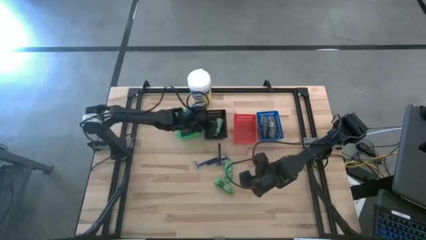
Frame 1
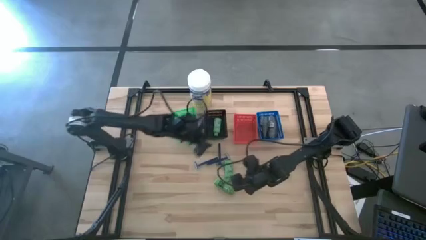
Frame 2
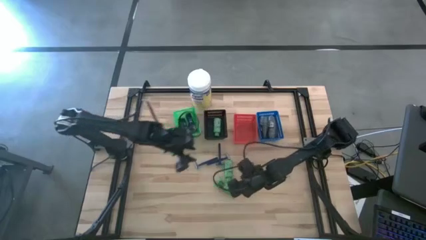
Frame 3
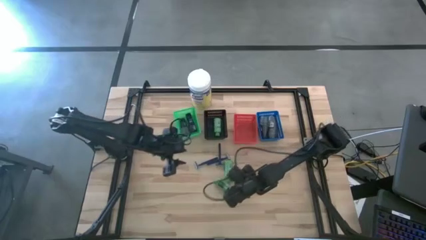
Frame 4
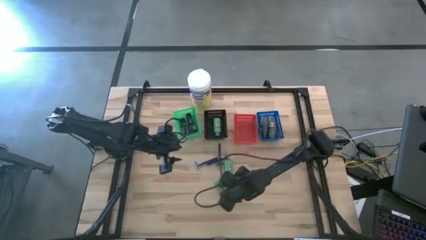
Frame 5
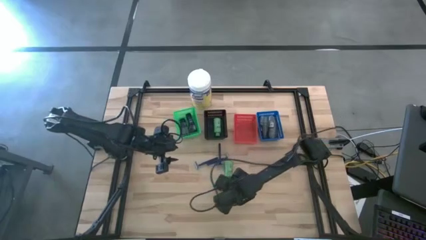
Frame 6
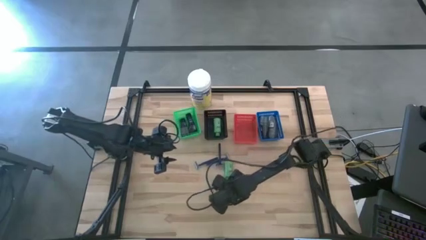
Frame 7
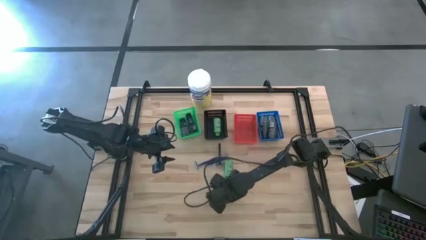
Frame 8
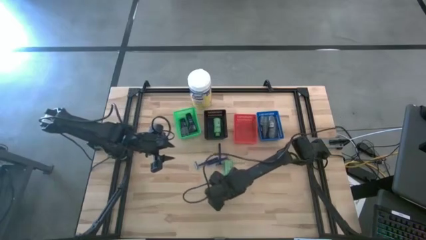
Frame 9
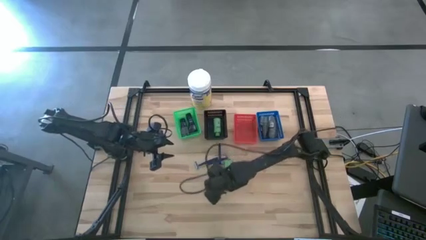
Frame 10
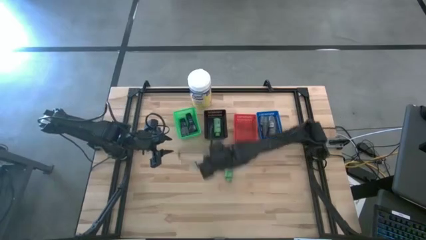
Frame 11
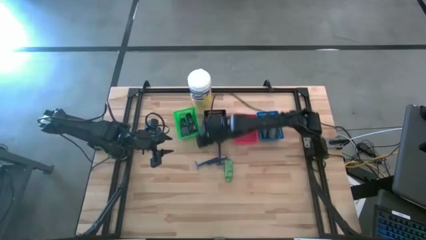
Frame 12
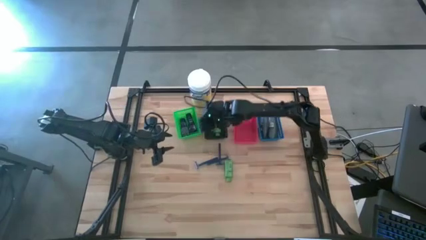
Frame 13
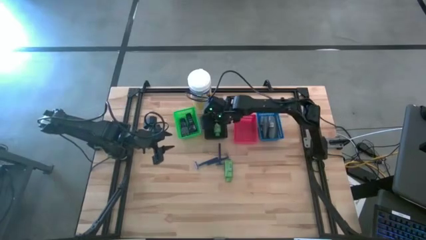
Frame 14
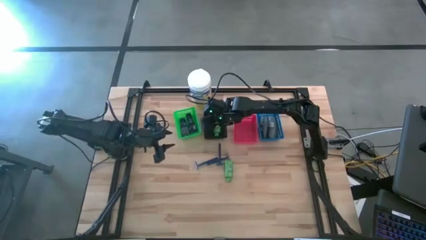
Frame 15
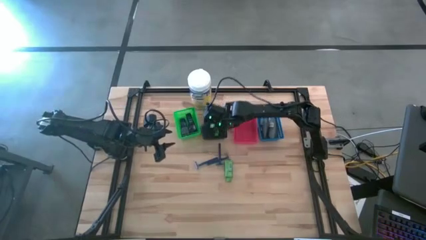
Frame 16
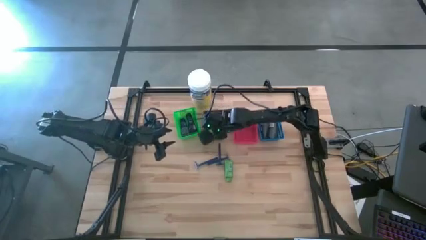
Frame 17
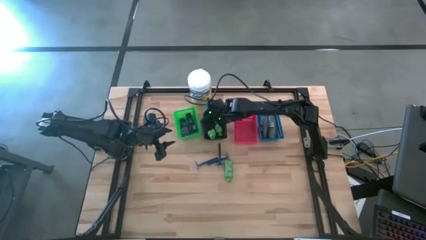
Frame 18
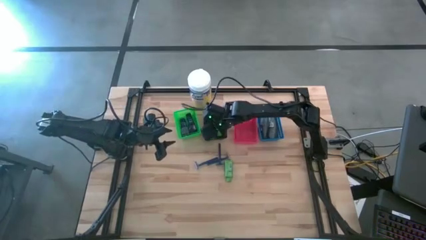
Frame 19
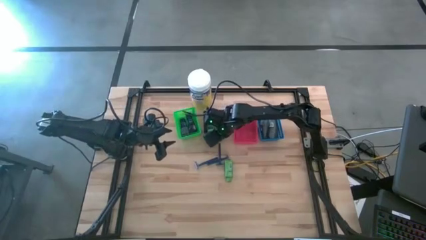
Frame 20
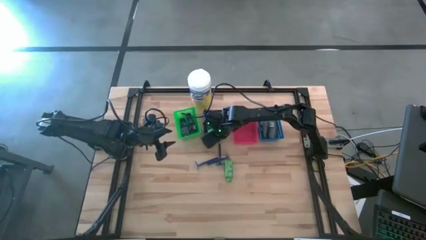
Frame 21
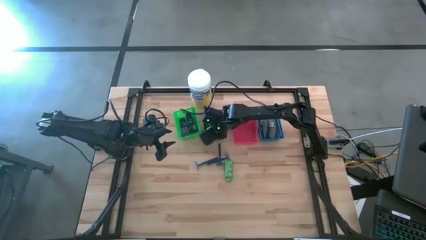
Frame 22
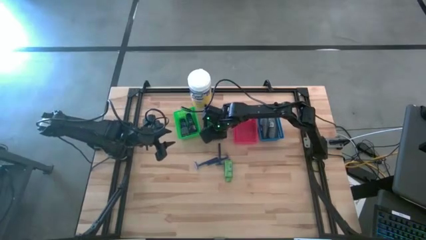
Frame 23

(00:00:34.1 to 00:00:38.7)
Task: Pick & Place Travel size toiletries
Put the green shampoo into the black bin

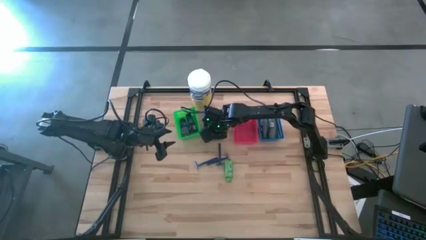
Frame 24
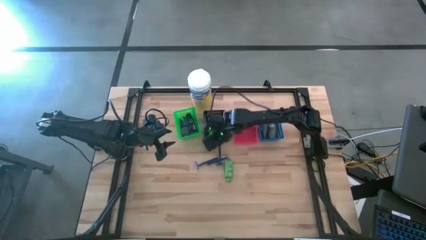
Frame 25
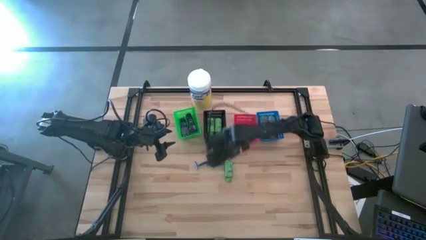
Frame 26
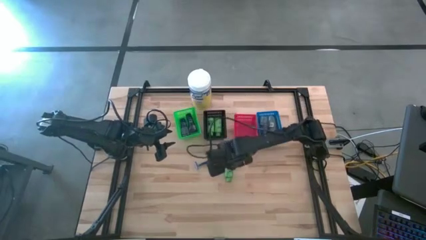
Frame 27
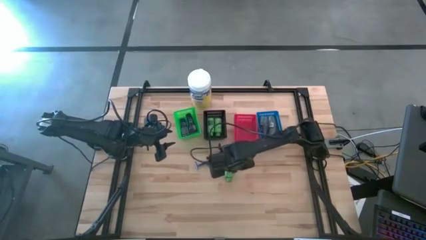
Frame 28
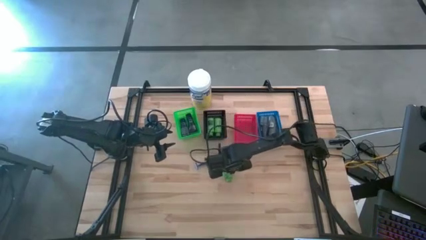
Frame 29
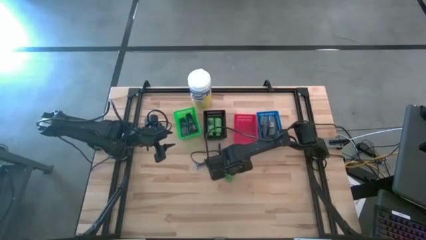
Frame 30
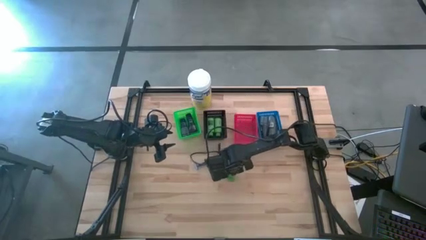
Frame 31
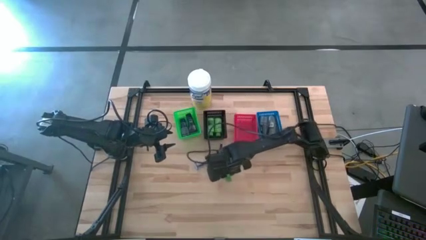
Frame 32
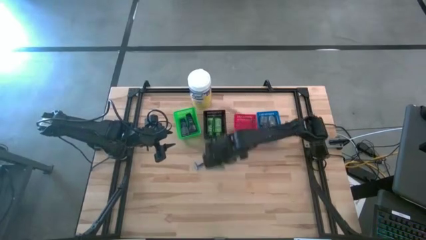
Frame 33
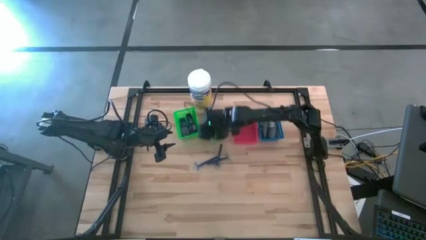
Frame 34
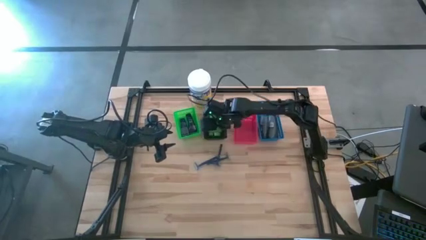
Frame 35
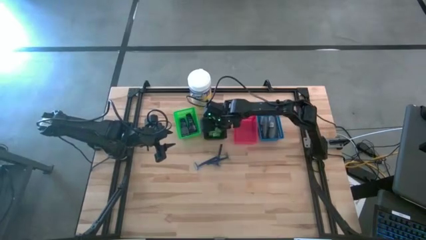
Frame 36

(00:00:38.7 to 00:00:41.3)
Put the green shampoo into the black bin

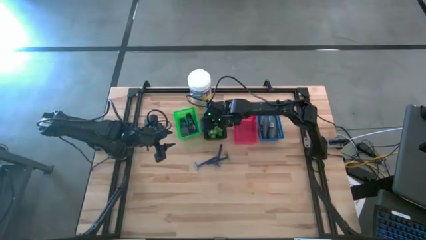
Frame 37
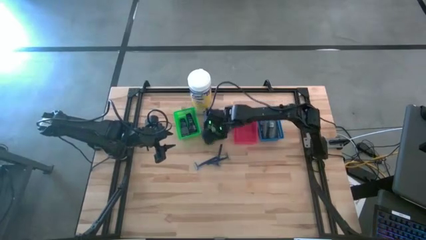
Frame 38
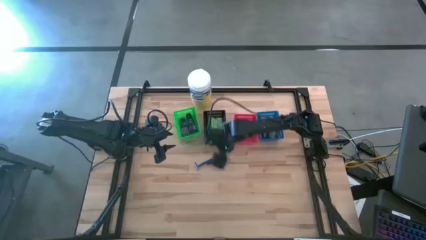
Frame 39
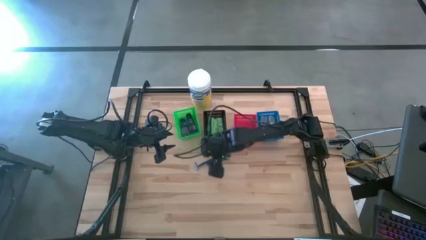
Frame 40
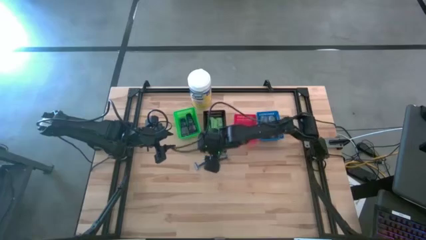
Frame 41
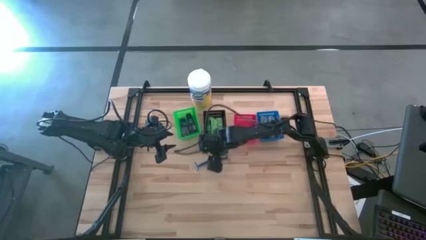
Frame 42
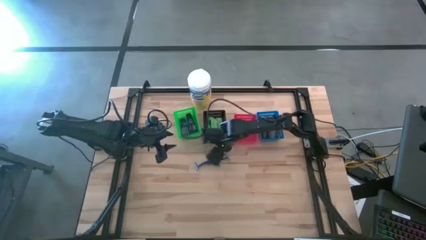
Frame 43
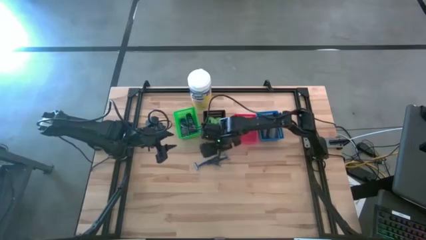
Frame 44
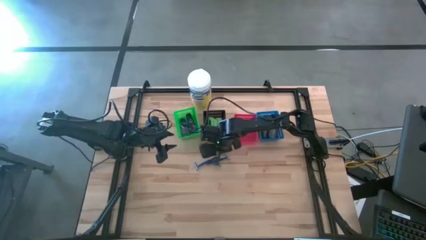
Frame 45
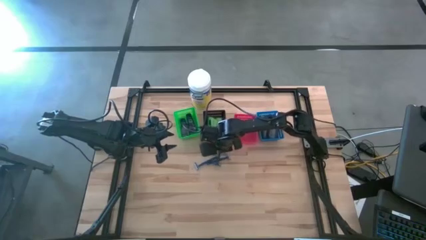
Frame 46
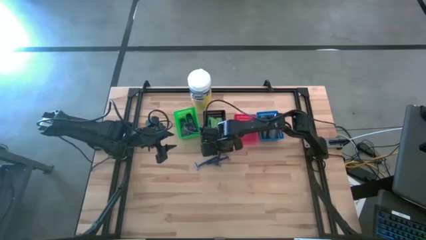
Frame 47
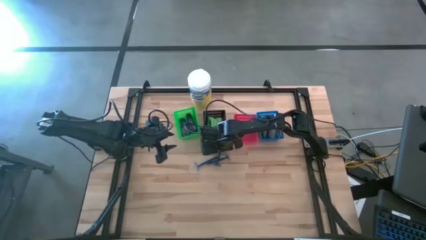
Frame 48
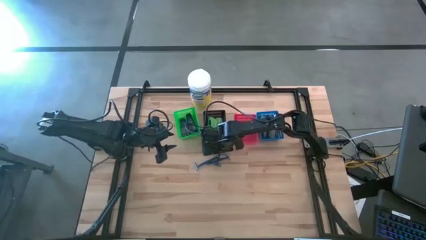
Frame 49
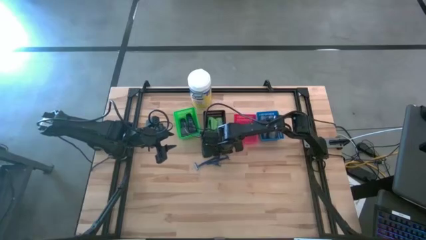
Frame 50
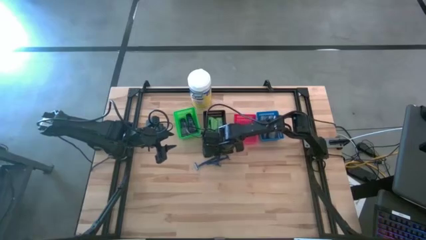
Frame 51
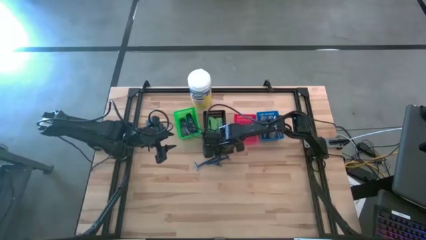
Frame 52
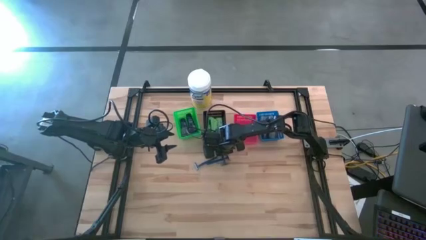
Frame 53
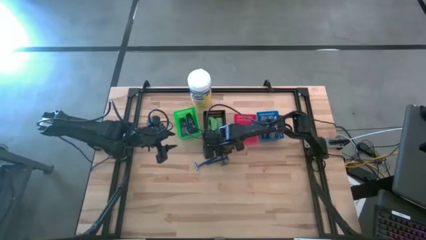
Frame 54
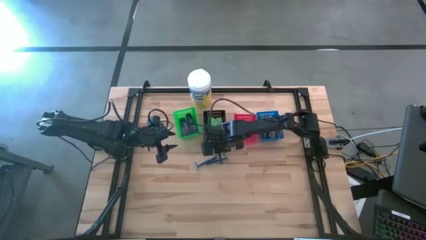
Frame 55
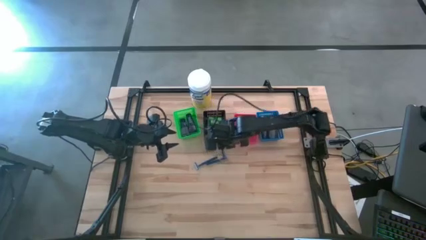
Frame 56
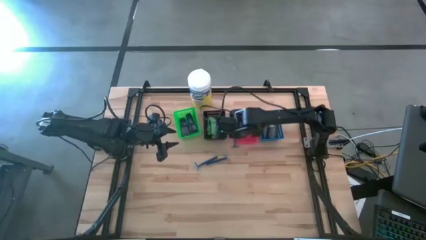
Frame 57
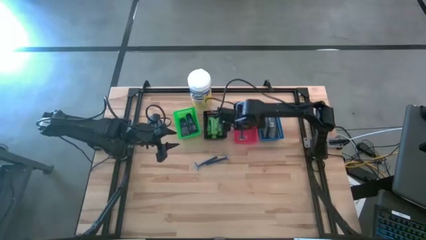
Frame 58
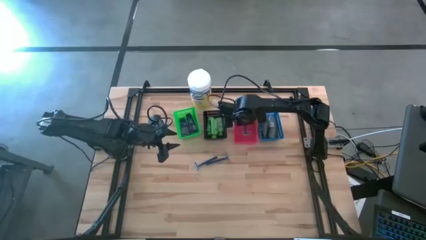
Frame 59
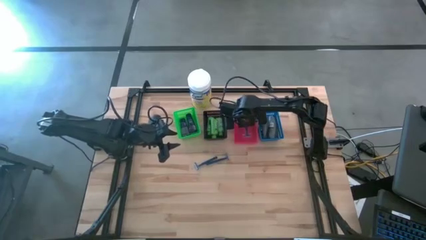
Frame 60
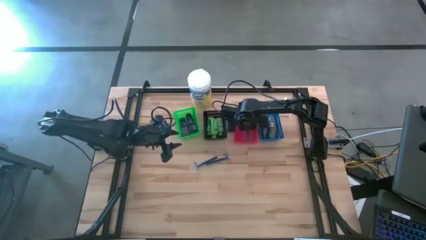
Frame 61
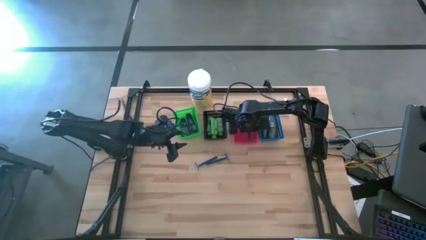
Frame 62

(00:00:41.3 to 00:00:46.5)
Put the blue shavers into the red bin

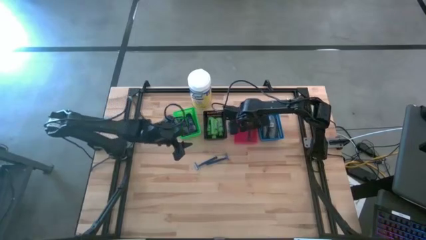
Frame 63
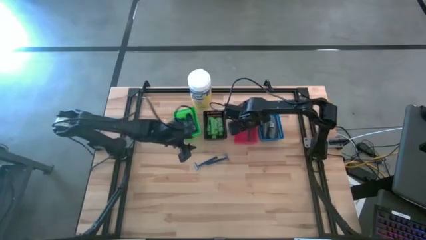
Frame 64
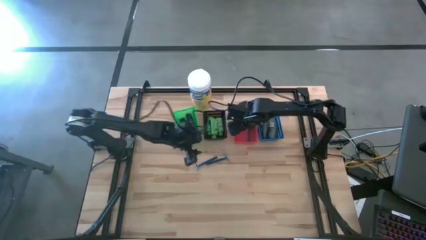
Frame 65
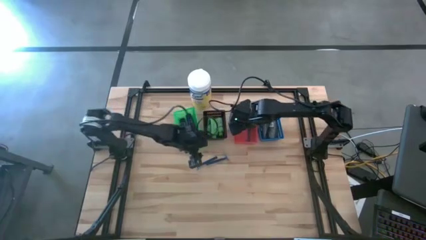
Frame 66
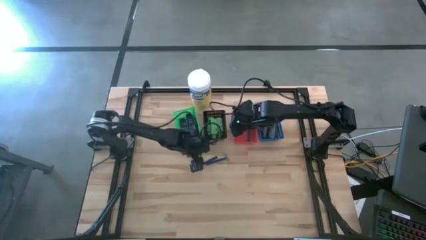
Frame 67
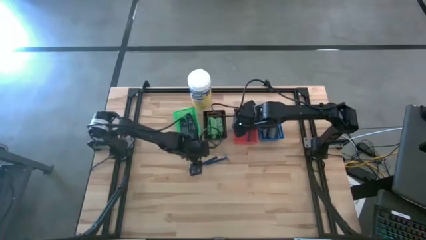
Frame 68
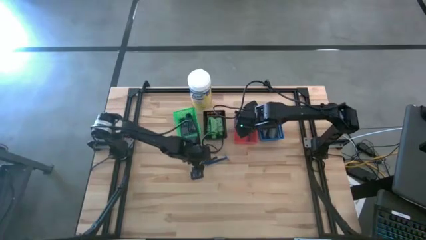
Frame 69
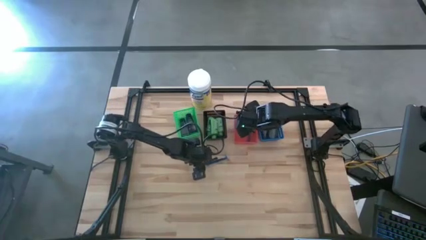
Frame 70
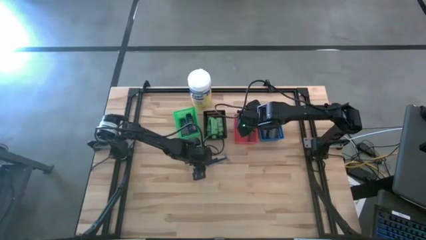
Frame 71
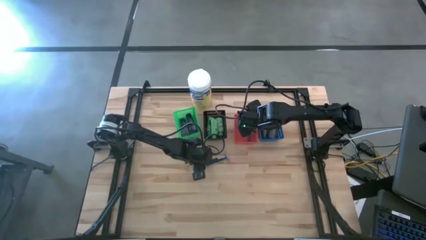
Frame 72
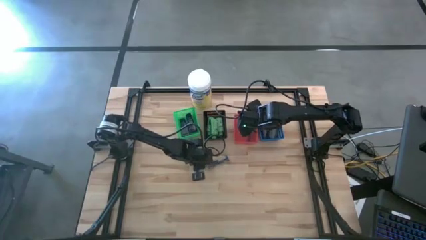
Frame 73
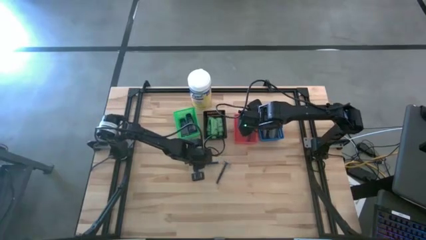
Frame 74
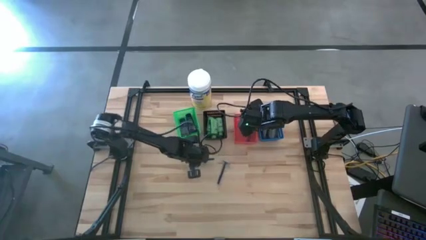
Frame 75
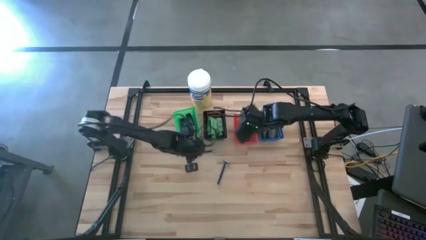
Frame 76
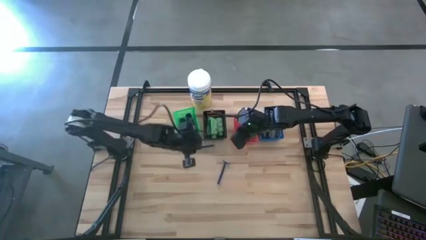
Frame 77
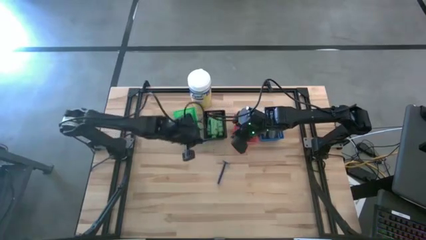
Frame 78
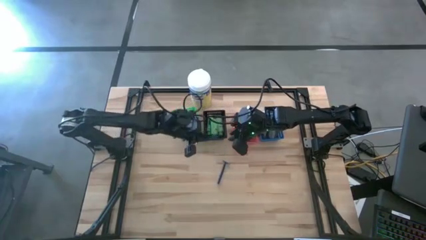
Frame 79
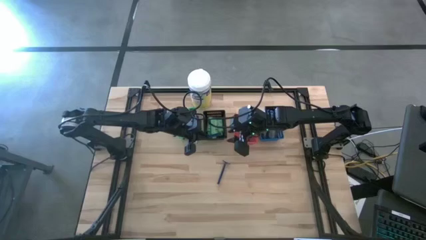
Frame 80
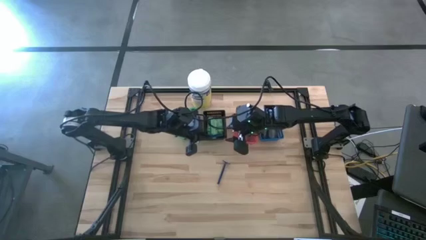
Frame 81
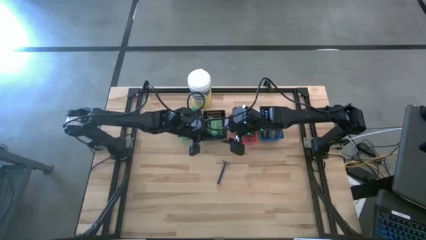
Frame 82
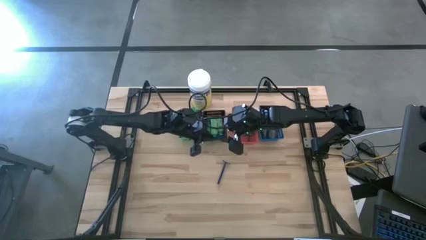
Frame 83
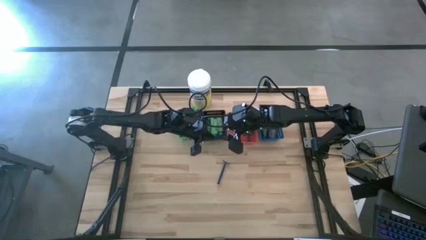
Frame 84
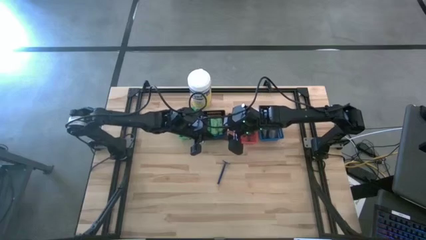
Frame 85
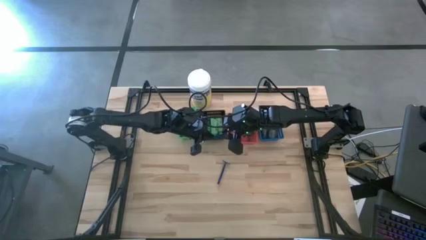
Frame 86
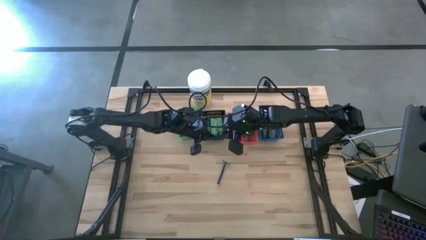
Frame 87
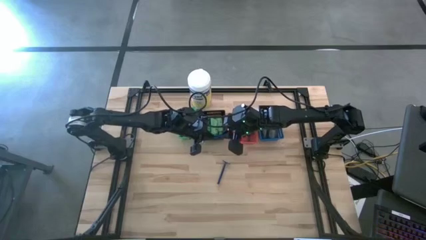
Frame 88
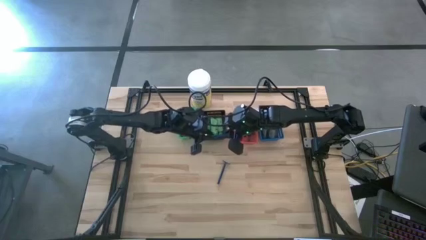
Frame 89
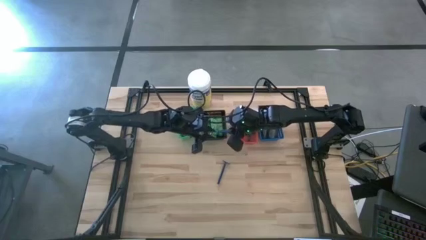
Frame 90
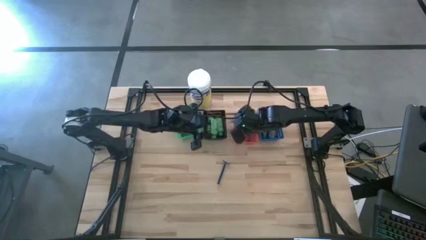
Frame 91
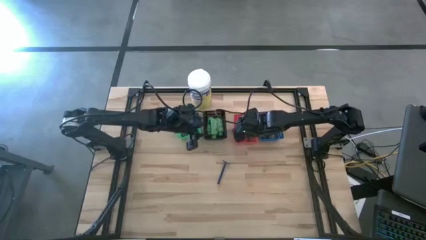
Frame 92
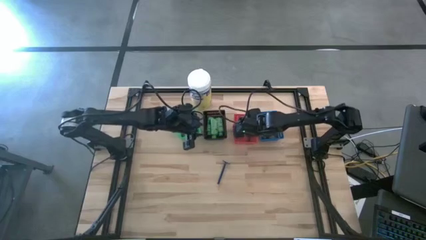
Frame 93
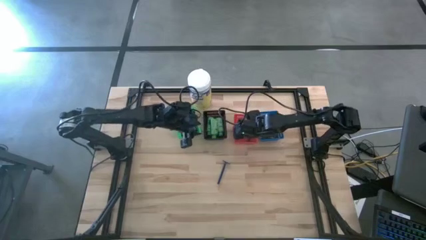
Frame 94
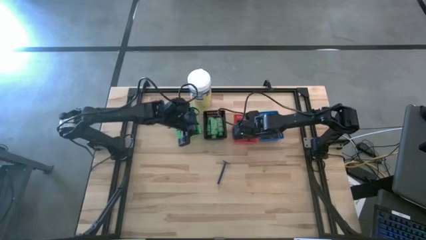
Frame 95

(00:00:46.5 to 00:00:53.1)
Put the blue shavers into the red bin
